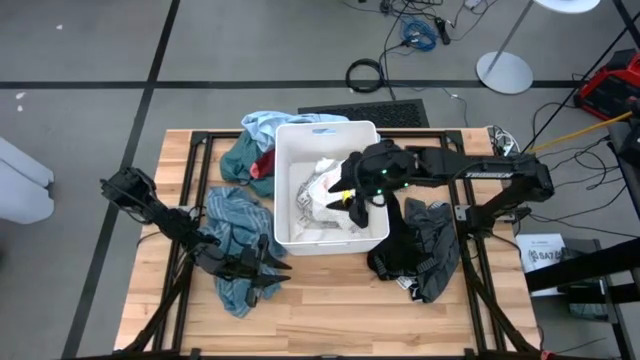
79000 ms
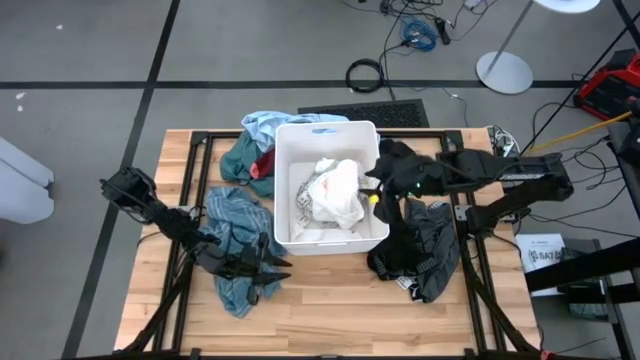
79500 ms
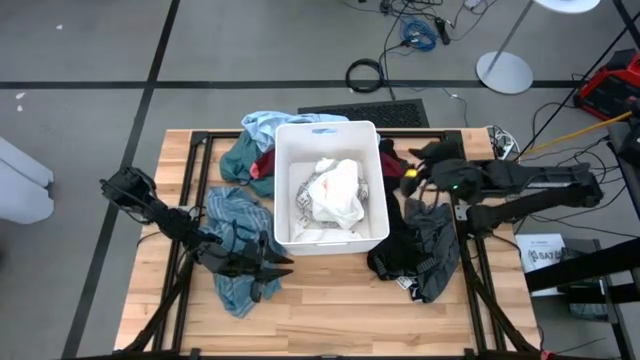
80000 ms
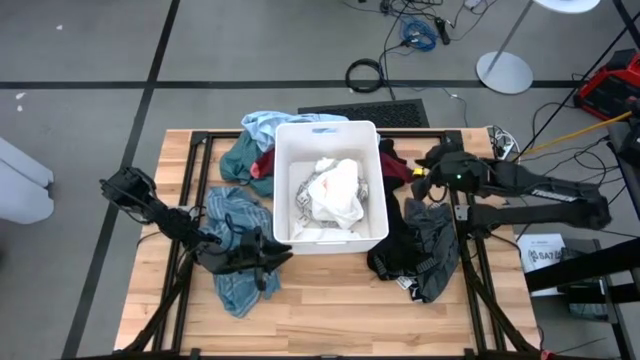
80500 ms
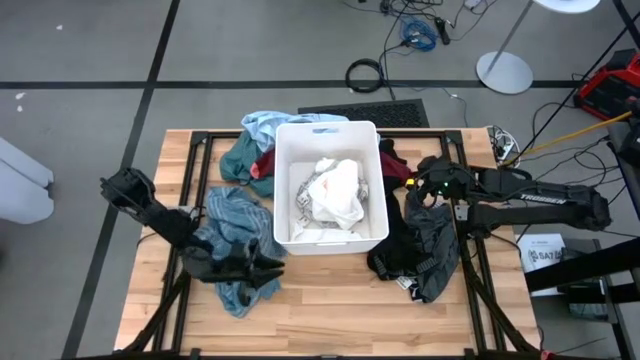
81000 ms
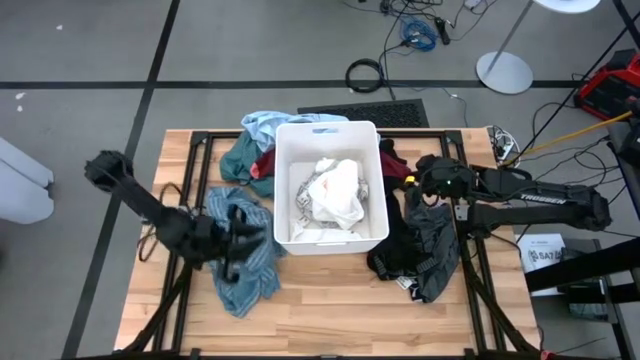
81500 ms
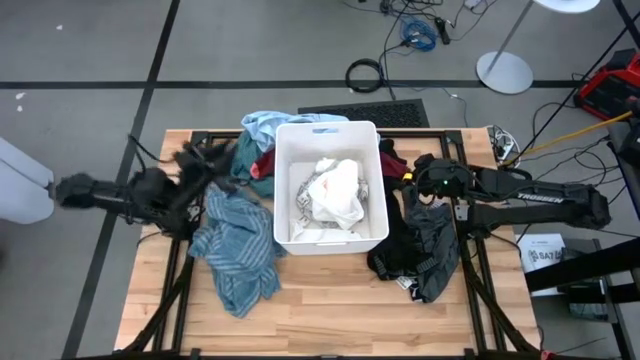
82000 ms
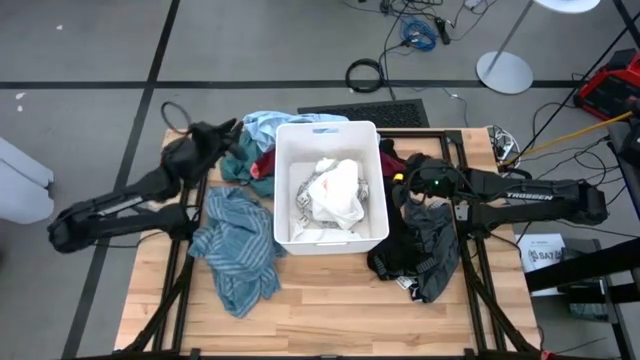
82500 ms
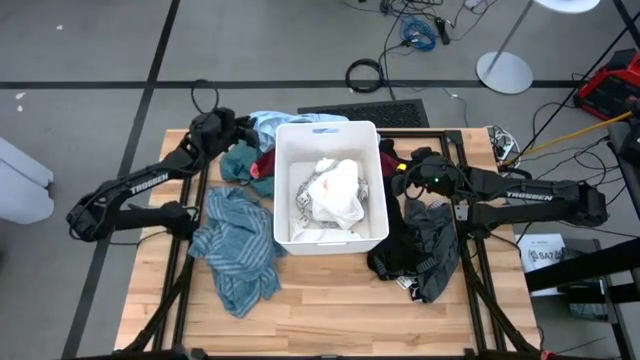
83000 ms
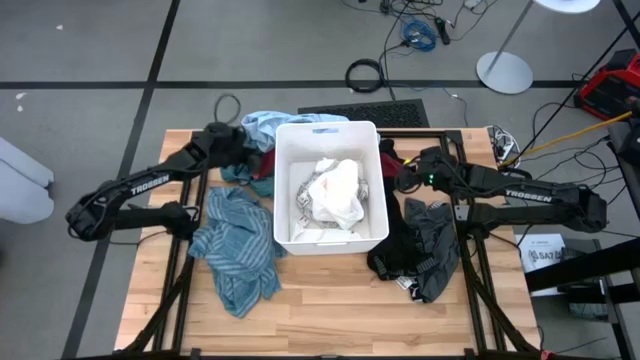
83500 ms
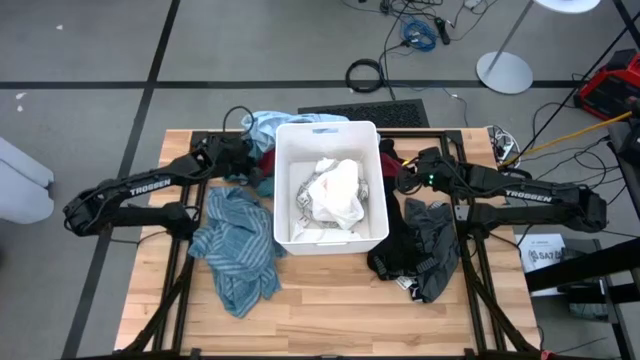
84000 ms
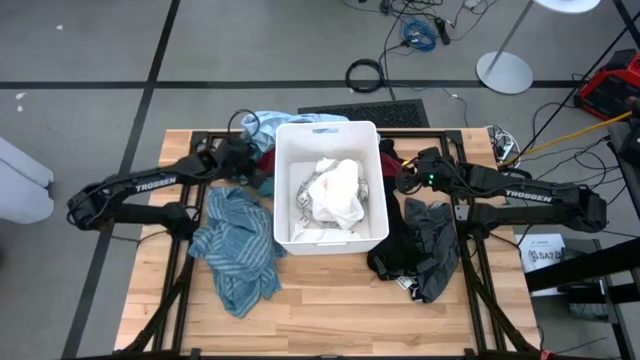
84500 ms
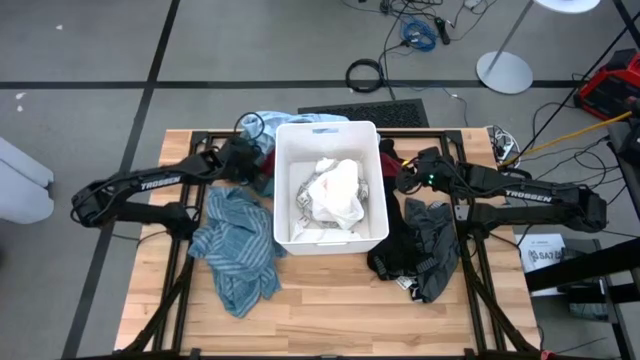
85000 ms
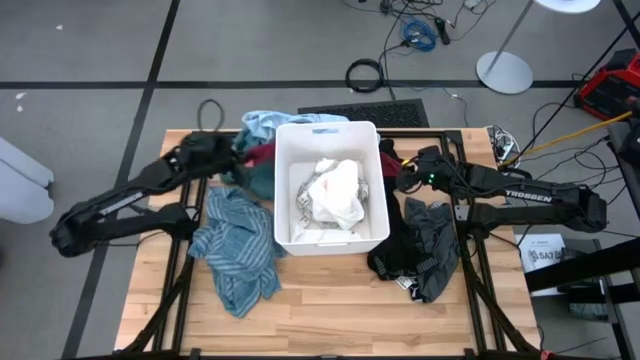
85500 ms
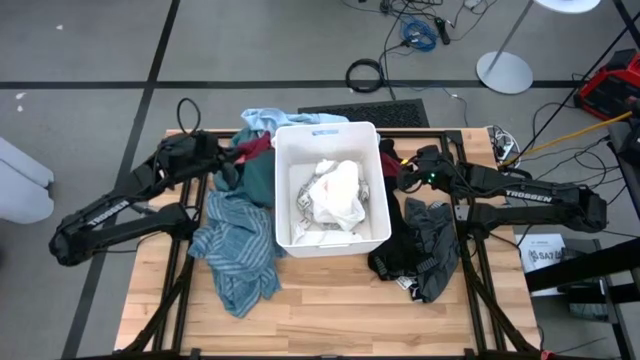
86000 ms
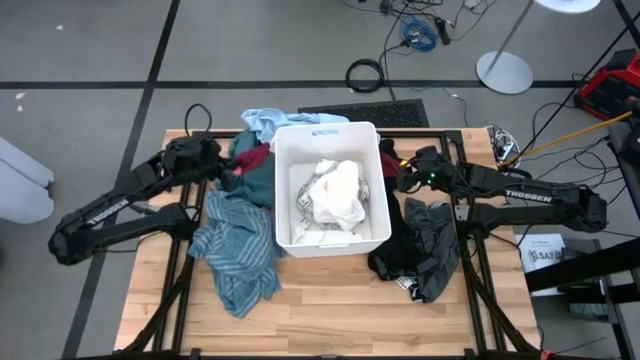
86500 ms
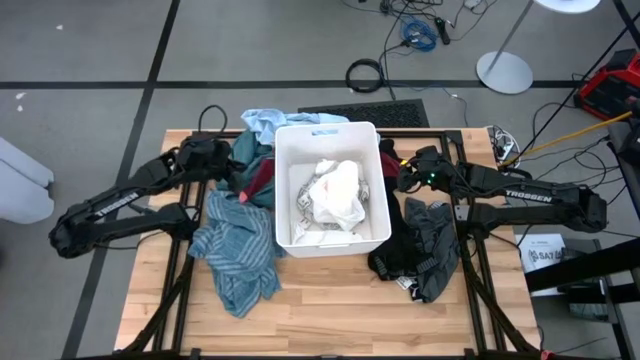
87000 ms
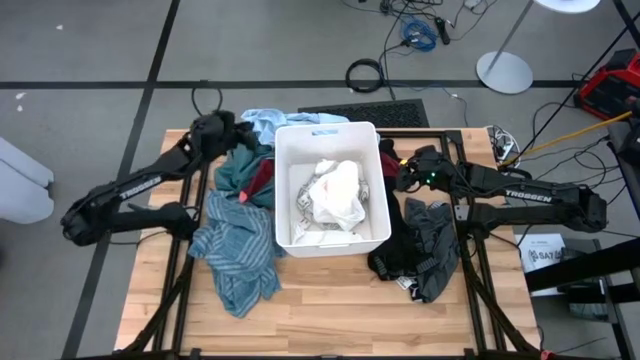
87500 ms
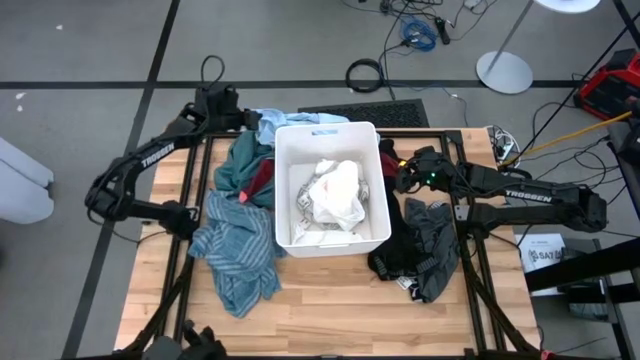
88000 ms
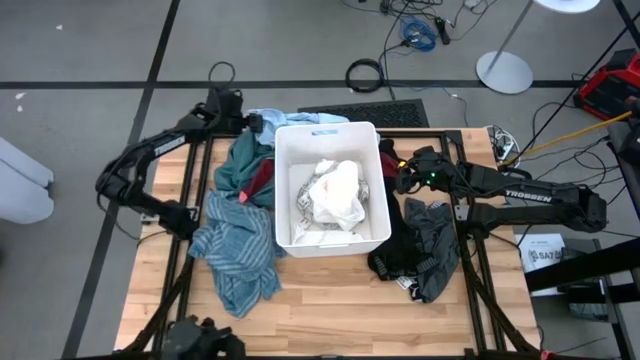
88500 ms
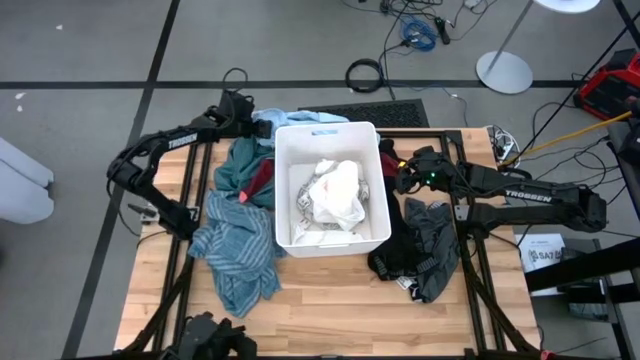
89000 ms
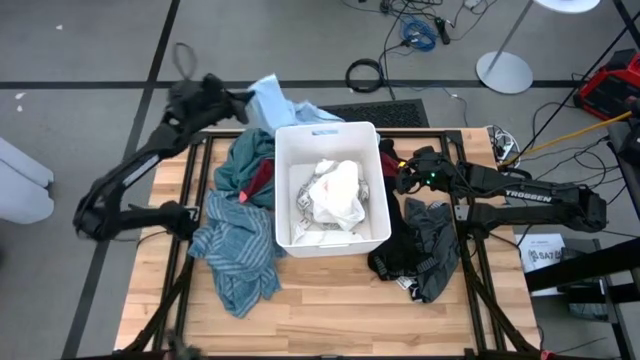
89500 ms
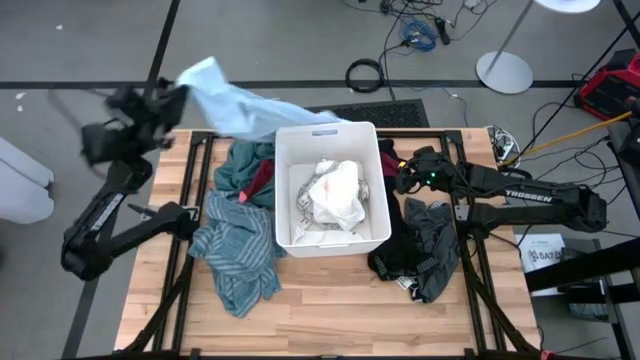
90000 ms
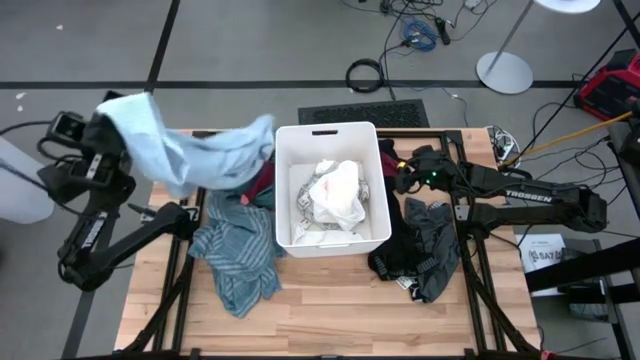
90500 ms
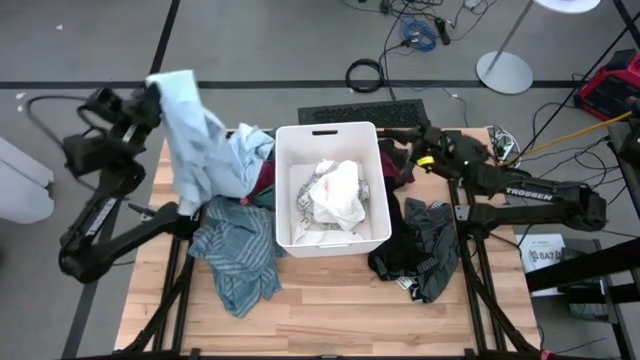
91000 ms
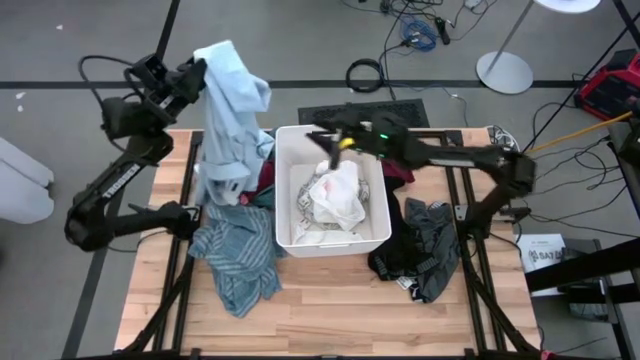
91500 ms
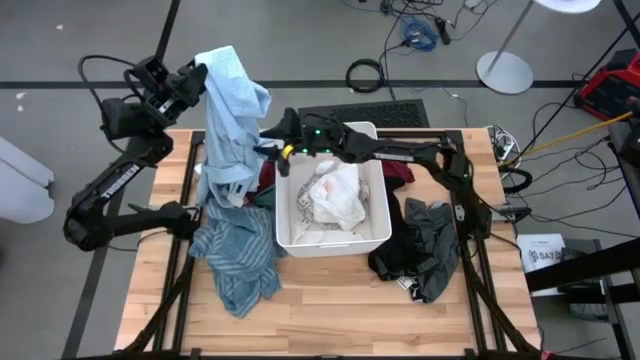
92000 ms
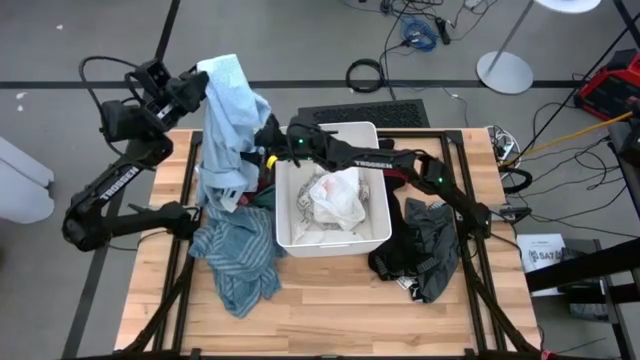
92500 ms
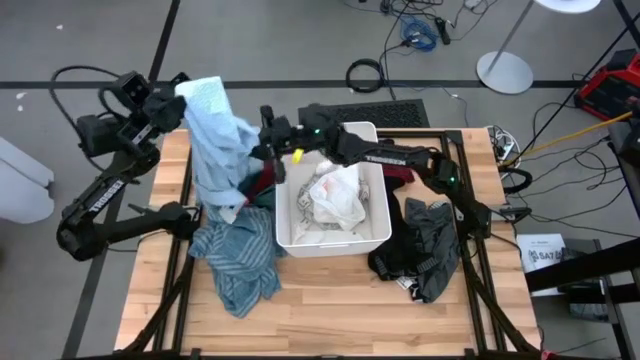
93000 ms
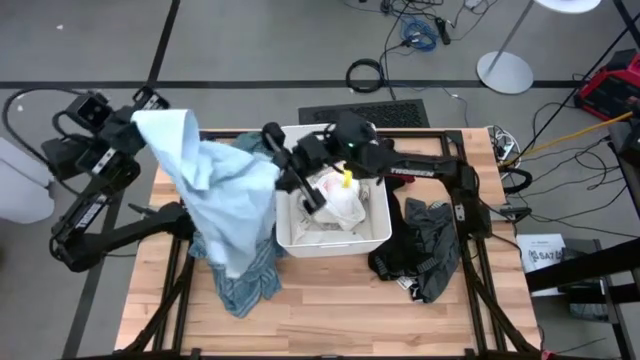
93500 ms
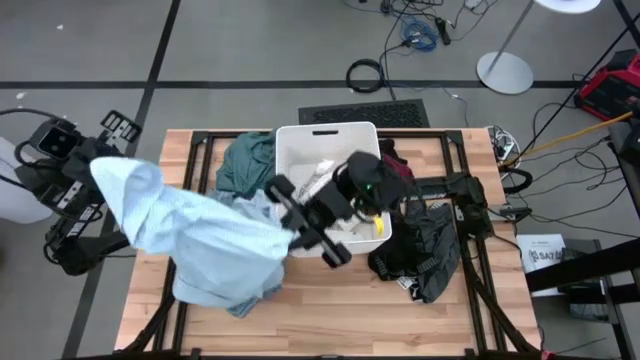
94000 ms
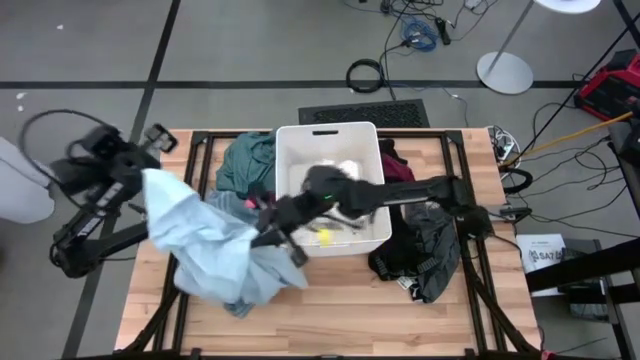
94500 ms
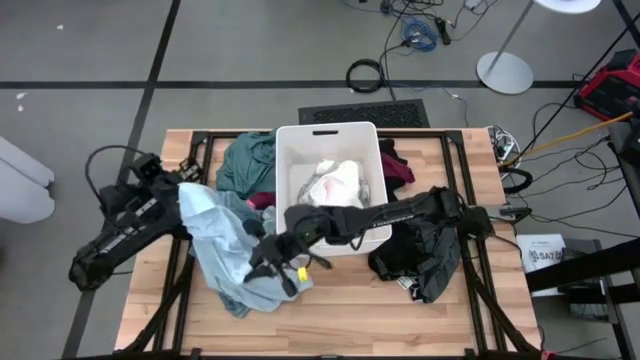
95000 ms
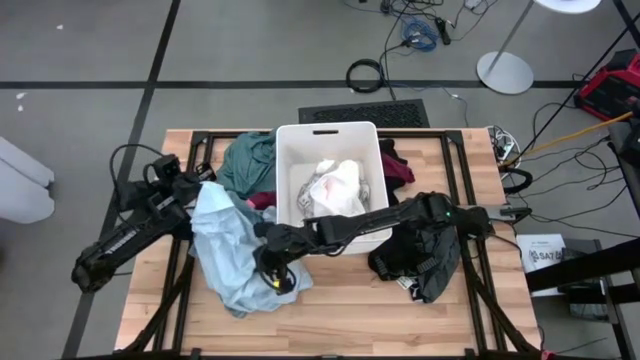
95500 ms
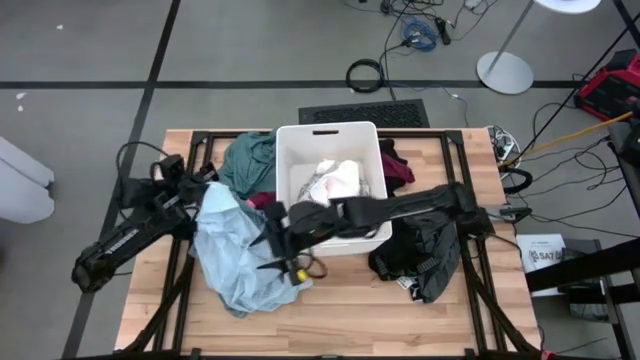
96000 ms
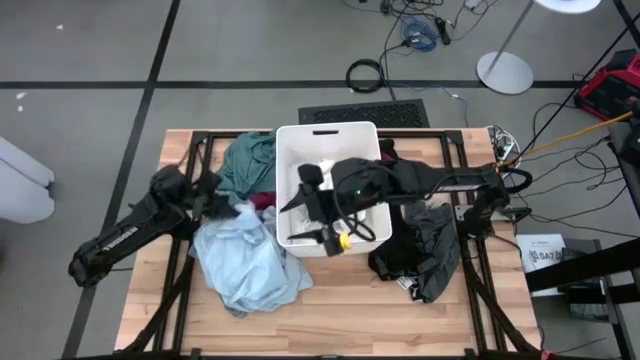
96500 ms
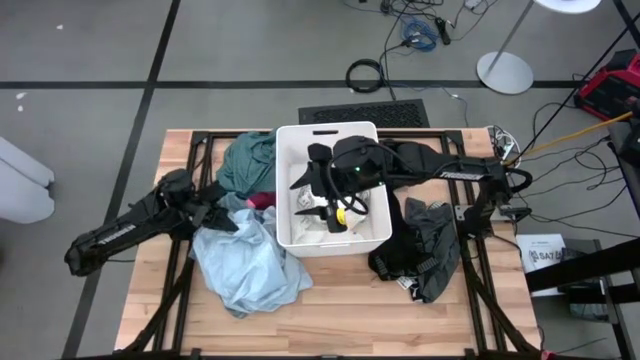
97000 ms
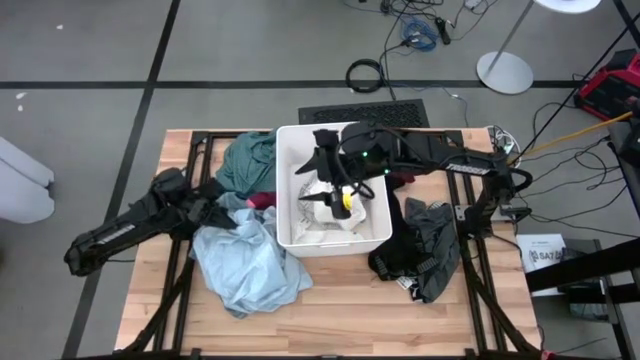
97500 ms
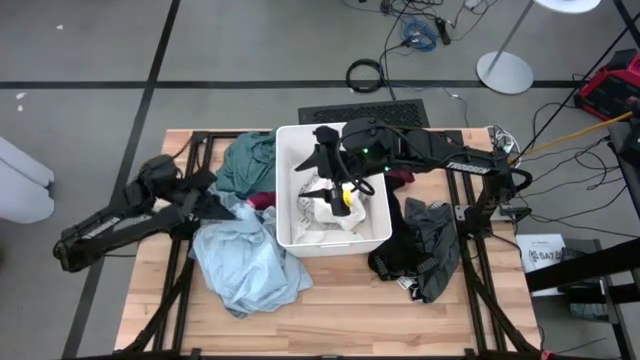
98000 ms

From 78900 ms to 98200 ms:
Task: Sort clothes
Move the gray and white shirt to the middle left of the table

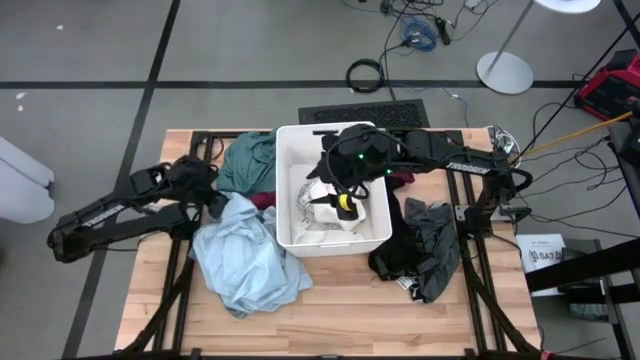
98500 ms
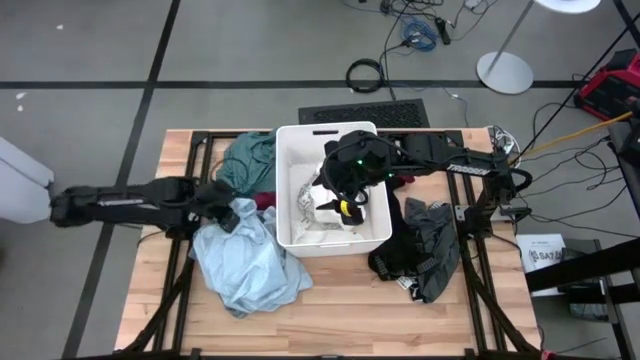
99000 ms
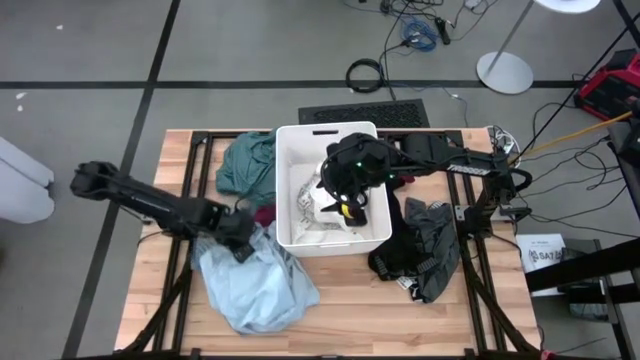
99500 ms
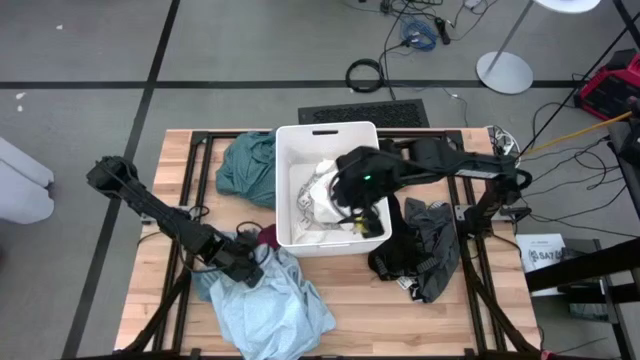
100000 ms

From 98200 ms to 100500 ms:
Move the clothes to the bottom left of the table
